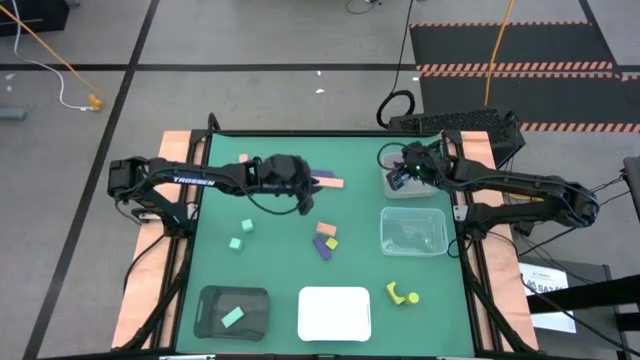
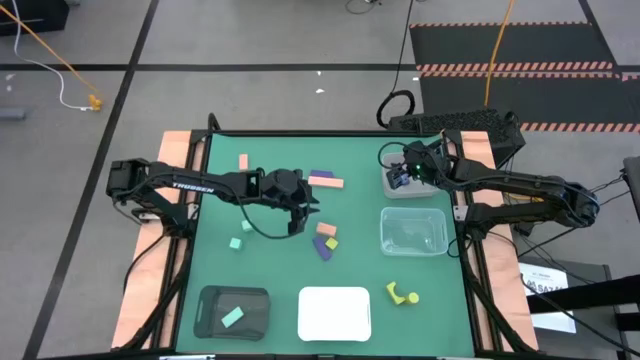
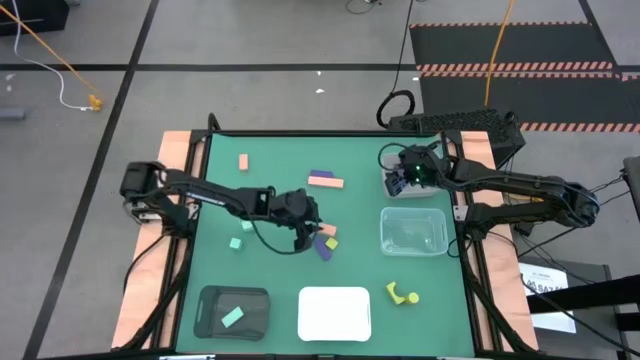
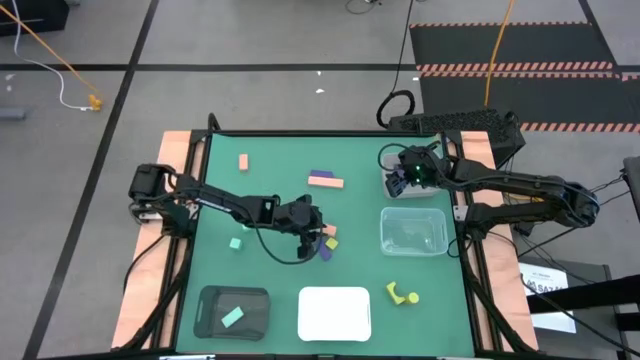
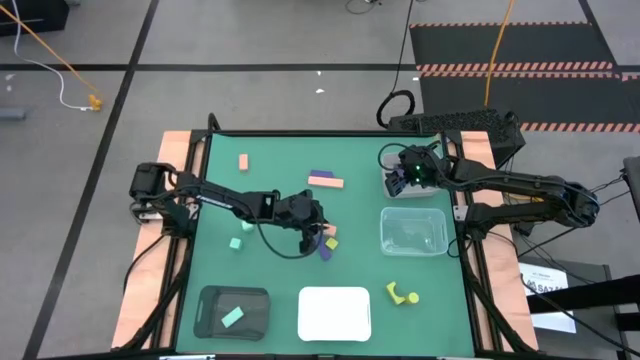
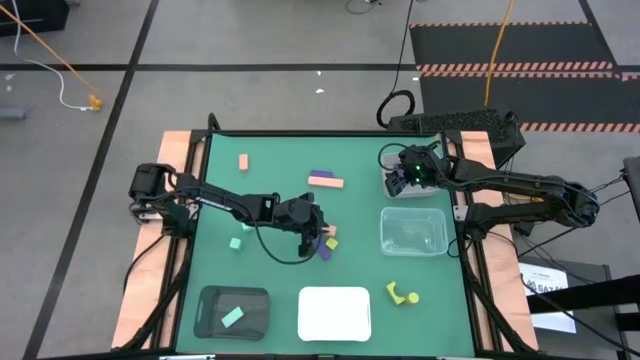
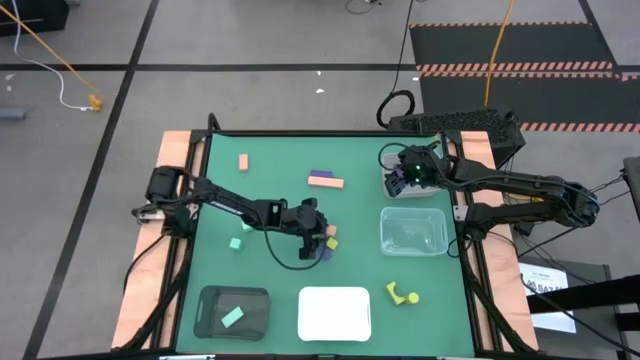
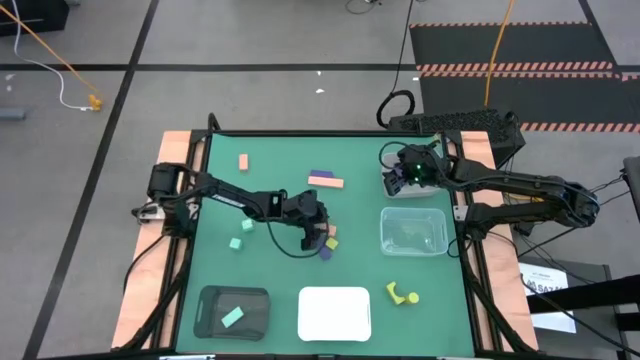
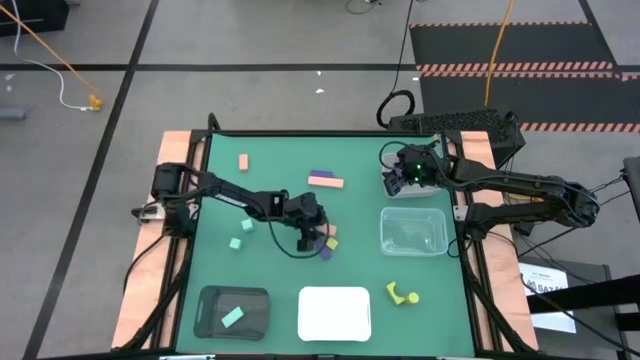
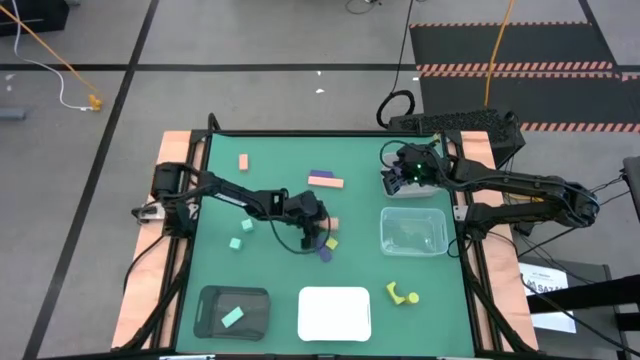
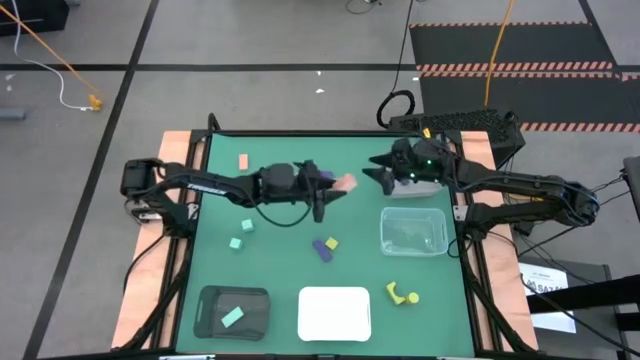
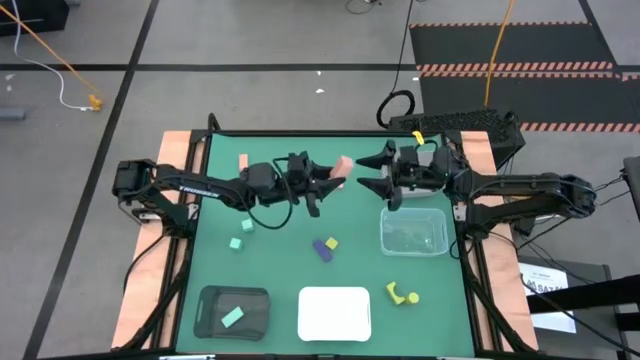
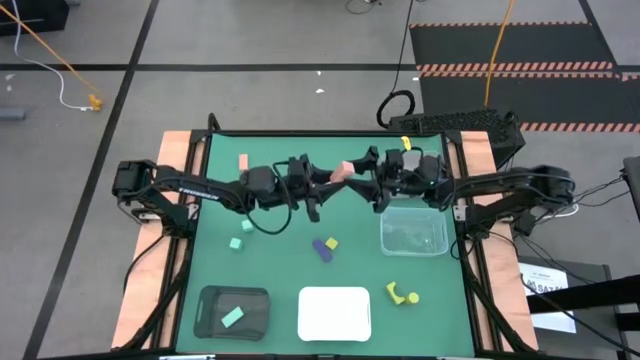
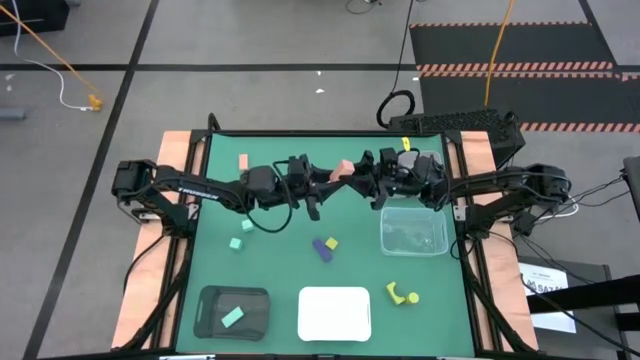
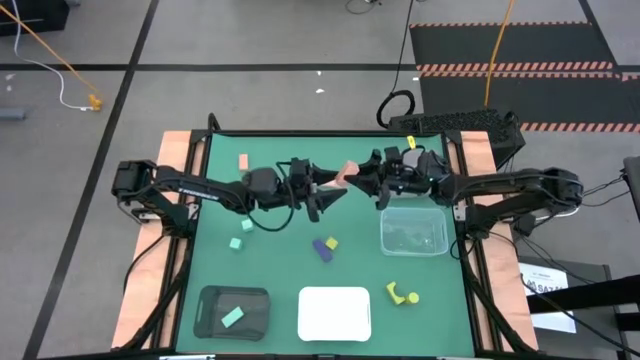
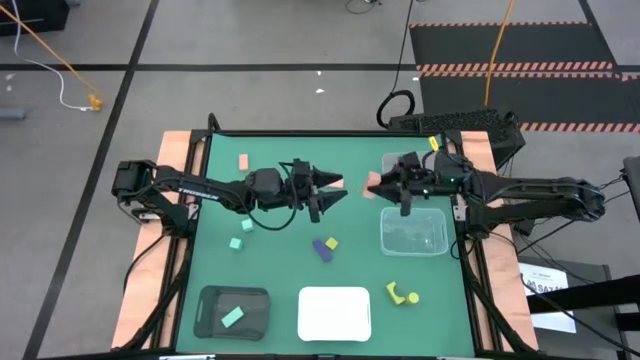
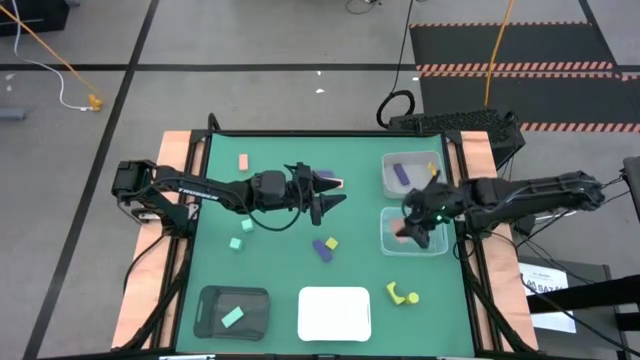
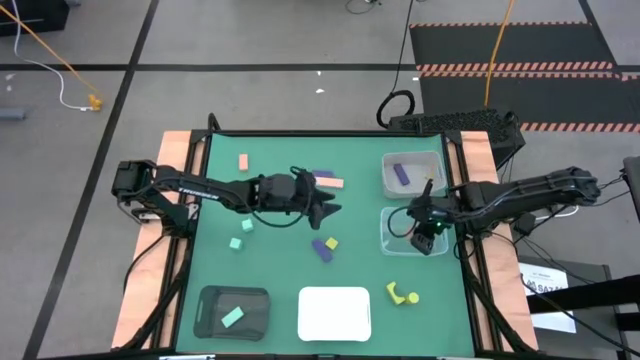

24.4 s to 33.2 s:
Task: Sort & place blocks by color
Put the bottom light orange block into the transparent bin

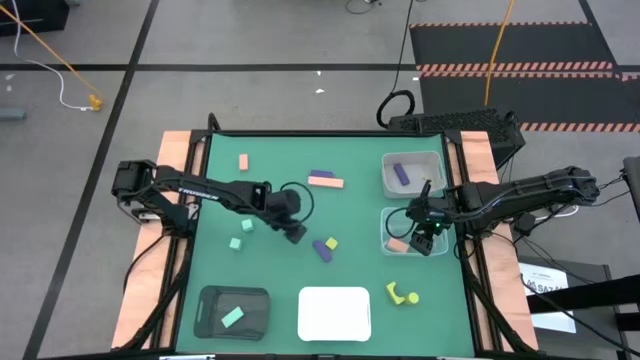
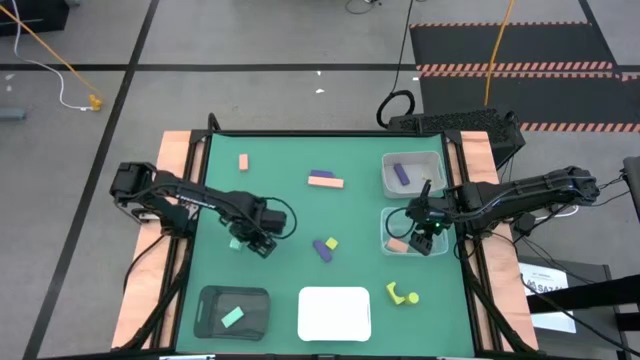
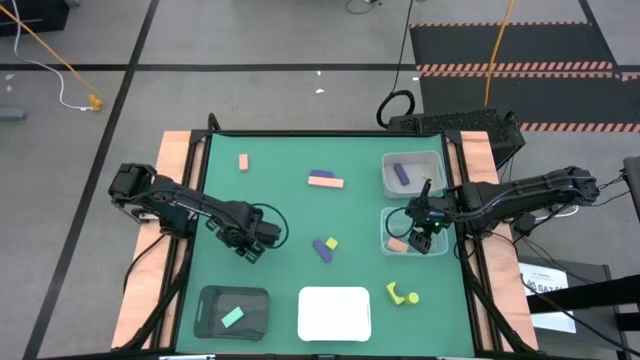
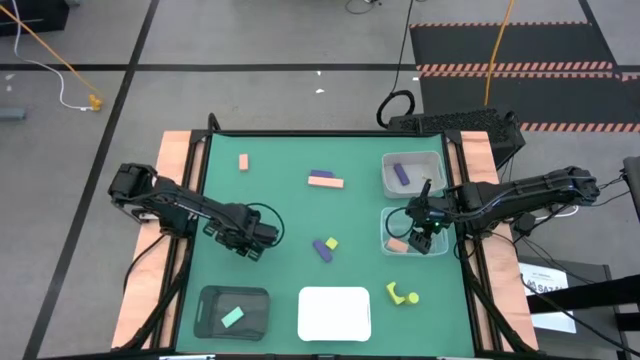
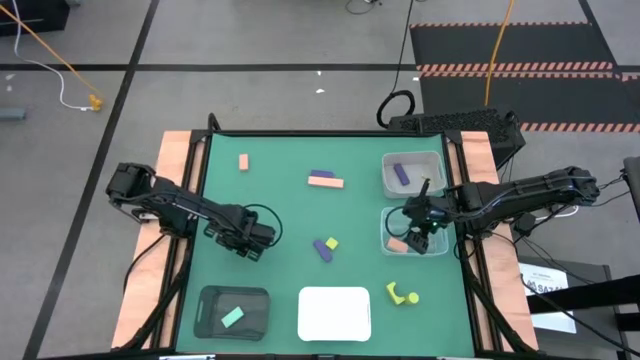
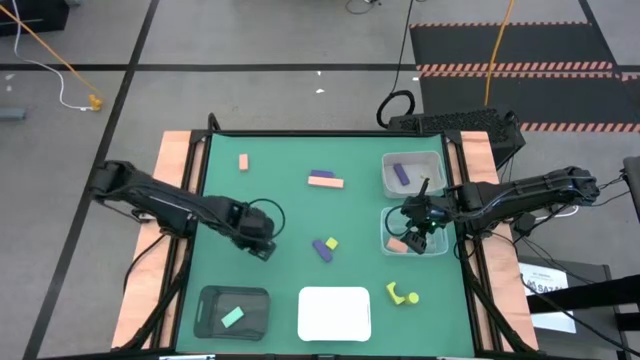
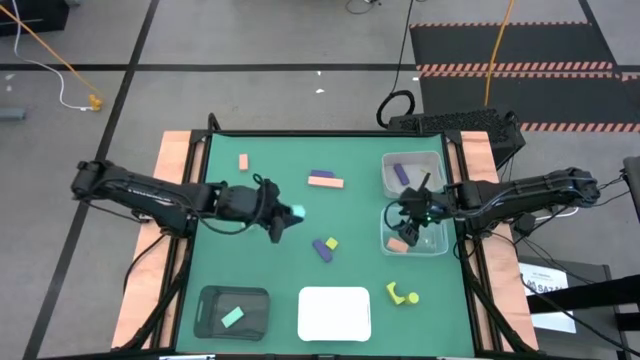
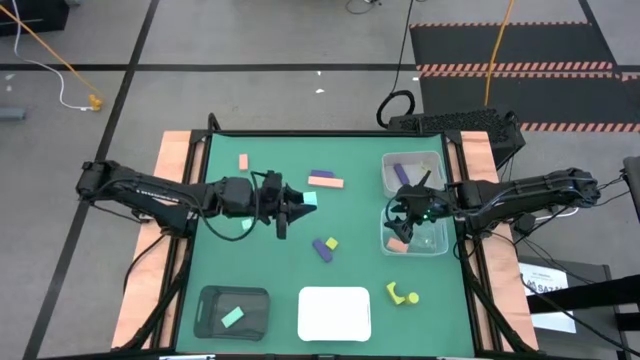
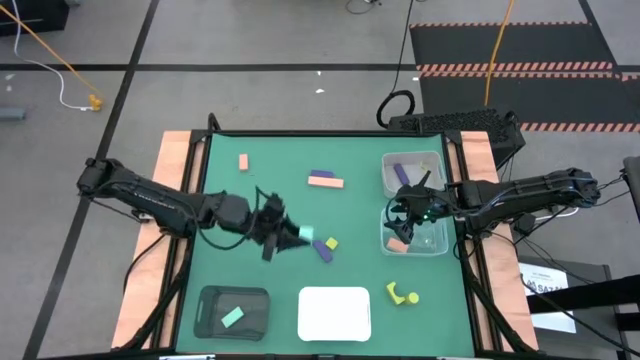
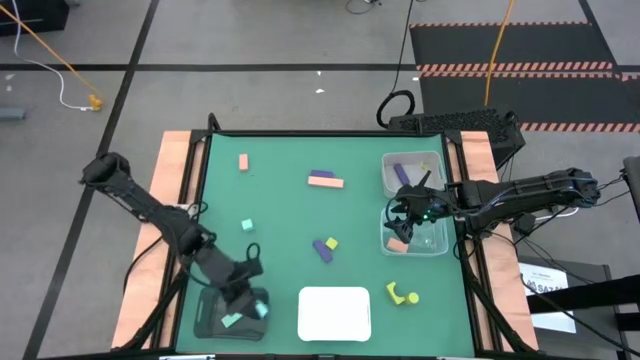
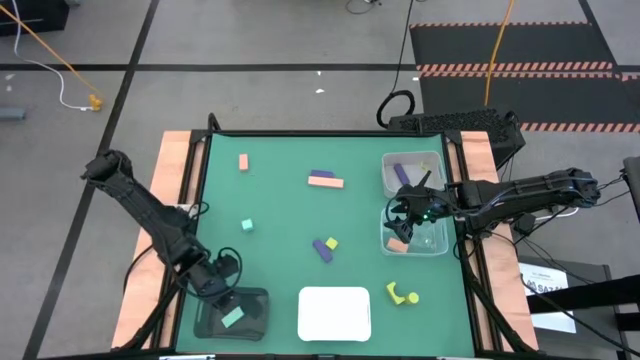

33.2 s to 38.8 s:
Put the bottom light blue block into the black bin

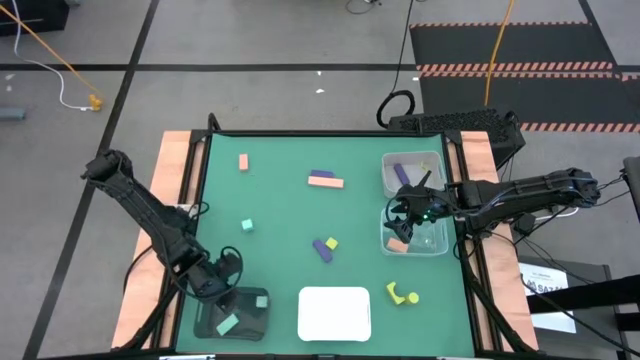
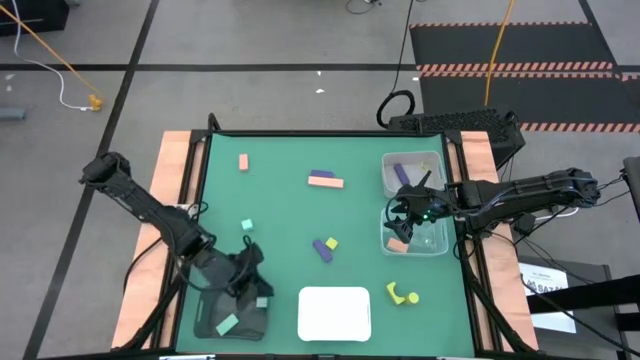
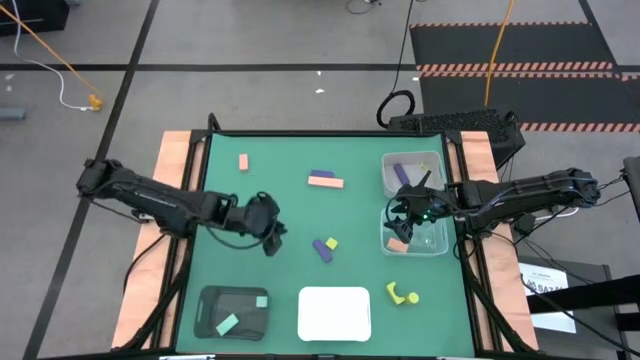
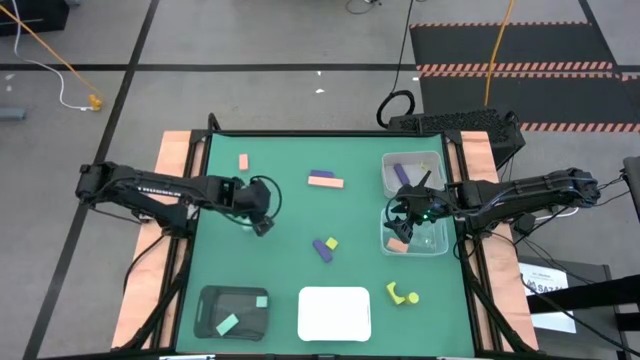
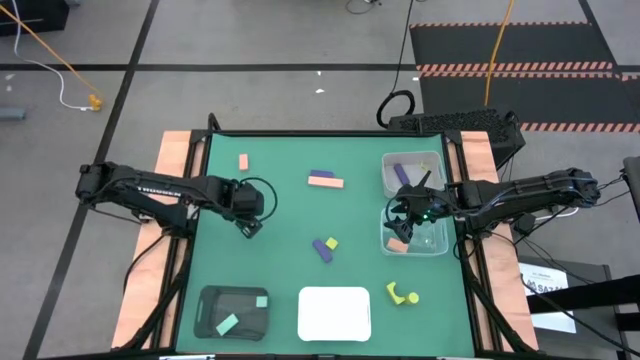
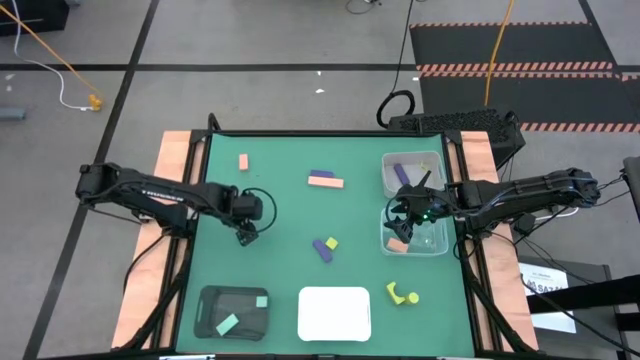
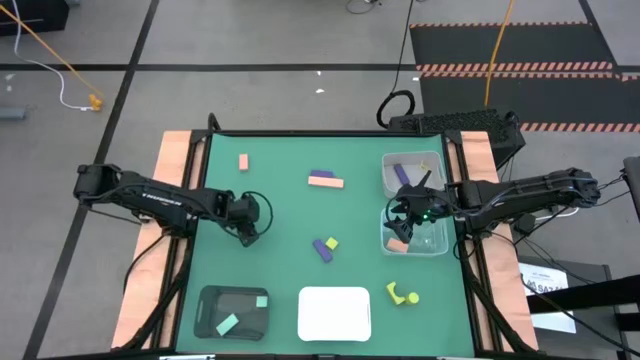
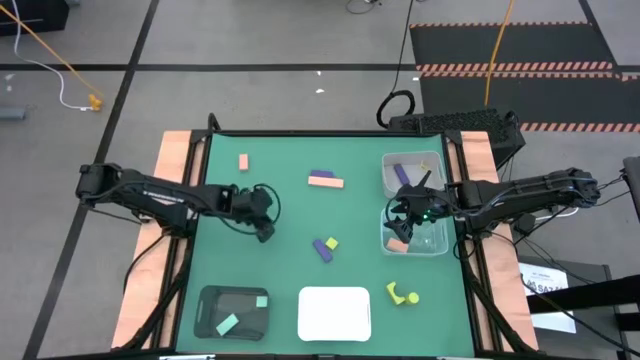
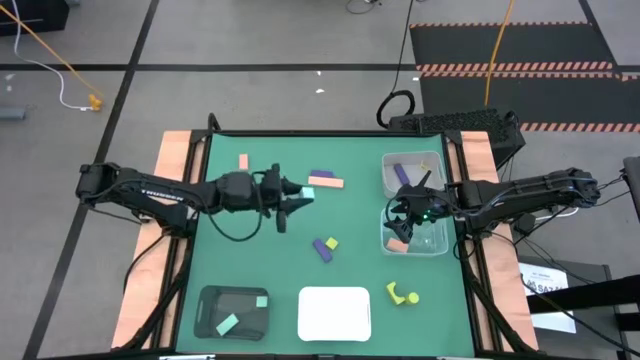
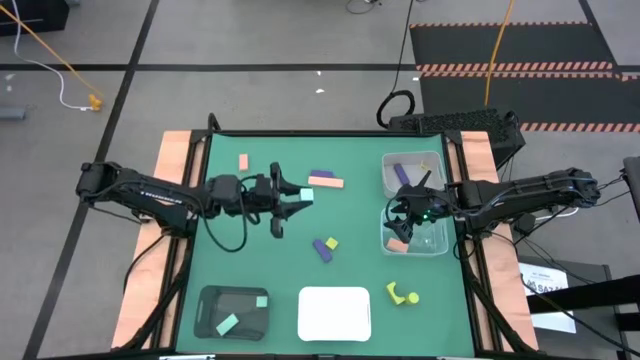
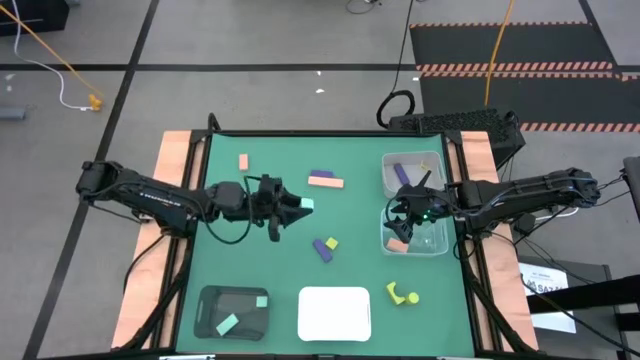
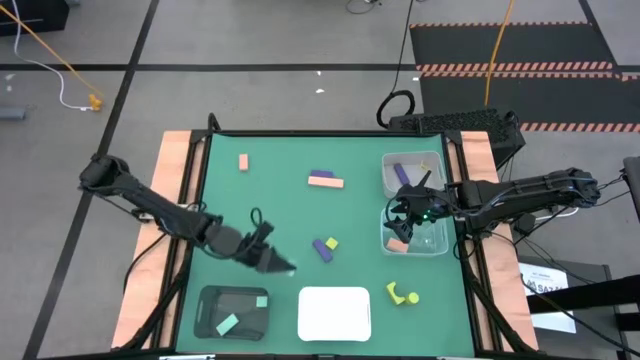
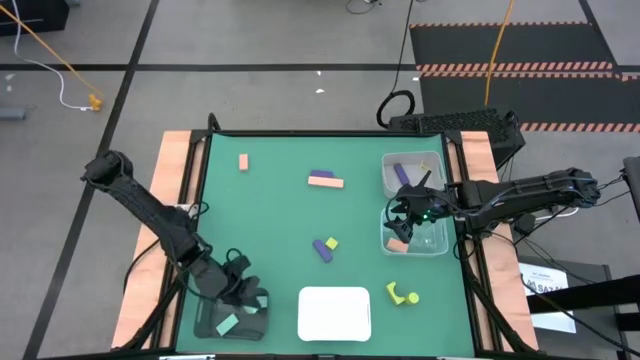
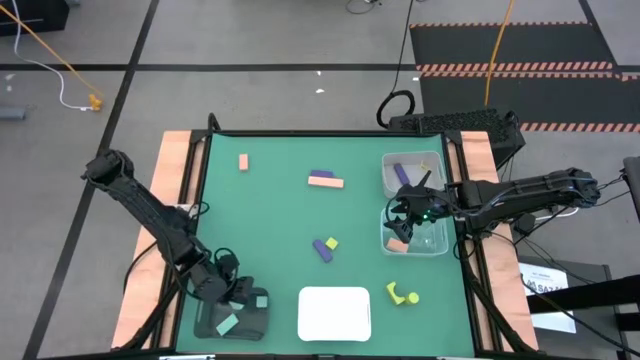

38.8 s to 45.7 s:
Put the light blue block into the black bin
